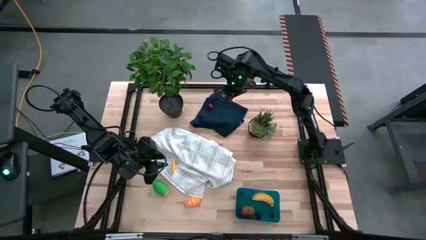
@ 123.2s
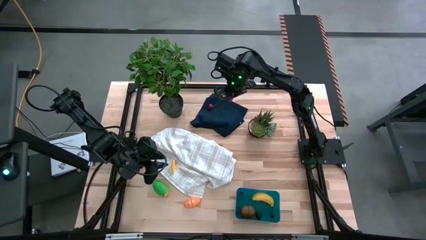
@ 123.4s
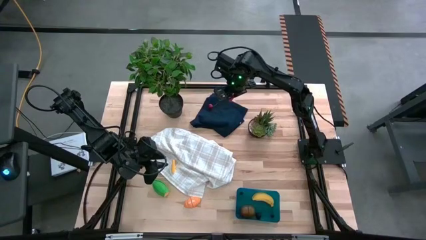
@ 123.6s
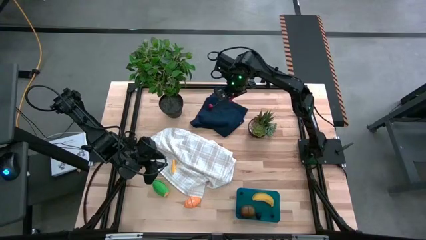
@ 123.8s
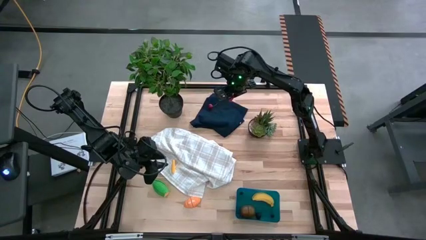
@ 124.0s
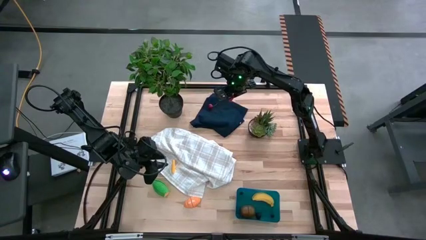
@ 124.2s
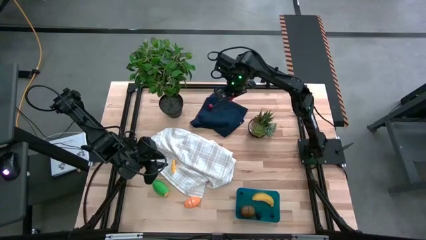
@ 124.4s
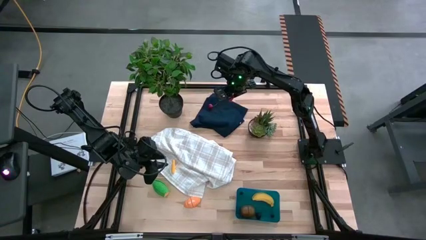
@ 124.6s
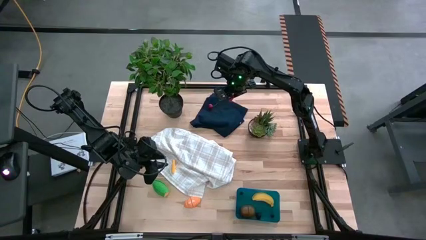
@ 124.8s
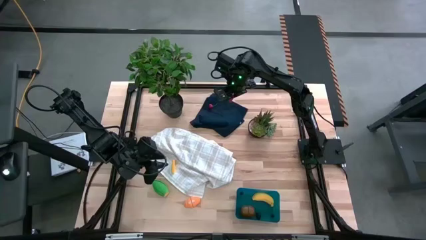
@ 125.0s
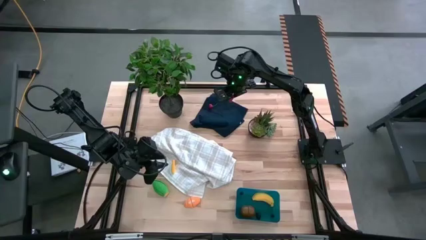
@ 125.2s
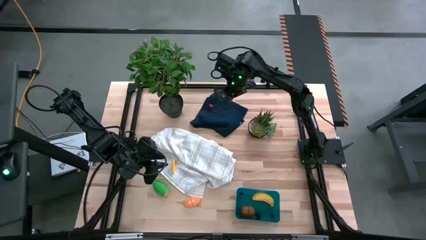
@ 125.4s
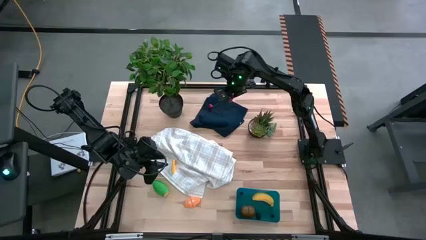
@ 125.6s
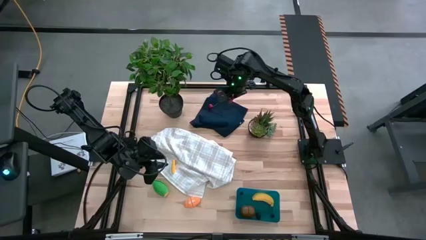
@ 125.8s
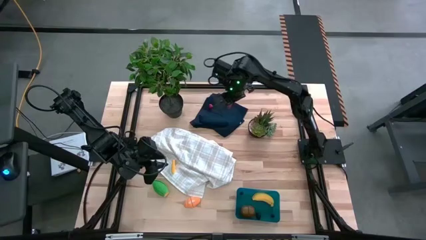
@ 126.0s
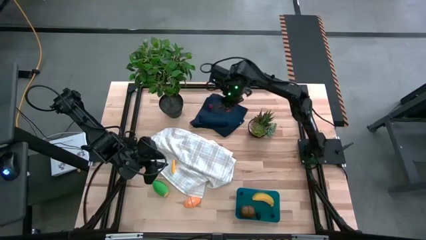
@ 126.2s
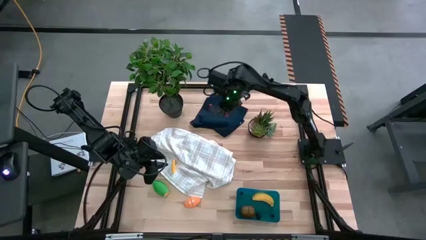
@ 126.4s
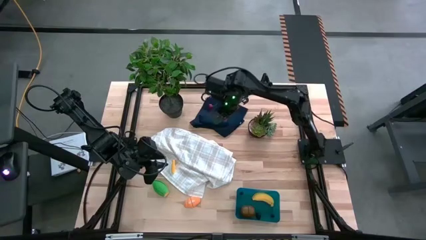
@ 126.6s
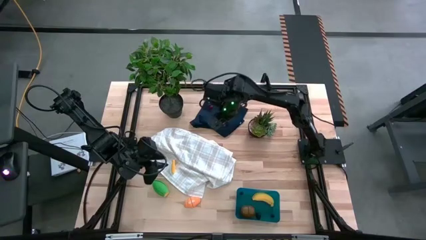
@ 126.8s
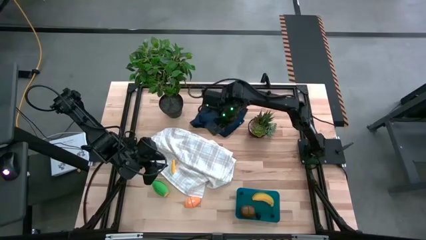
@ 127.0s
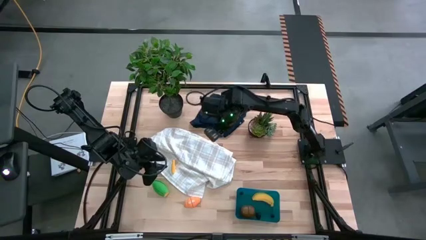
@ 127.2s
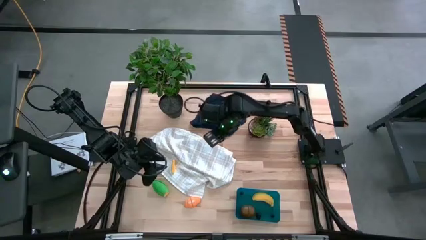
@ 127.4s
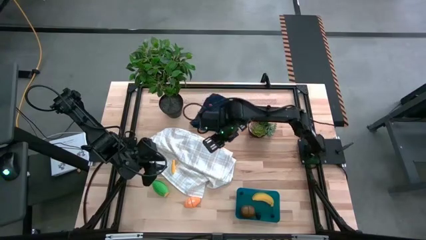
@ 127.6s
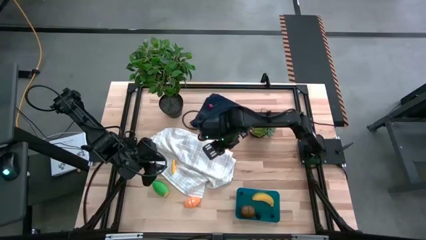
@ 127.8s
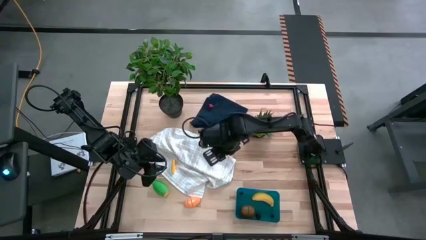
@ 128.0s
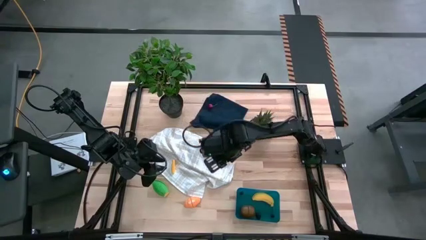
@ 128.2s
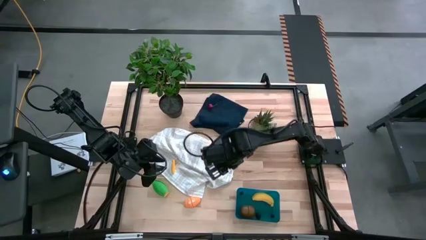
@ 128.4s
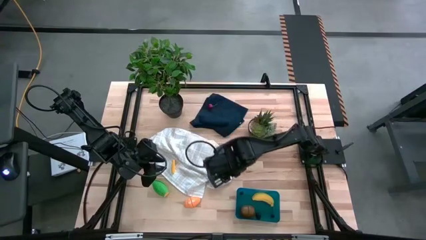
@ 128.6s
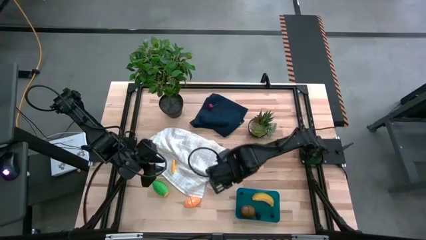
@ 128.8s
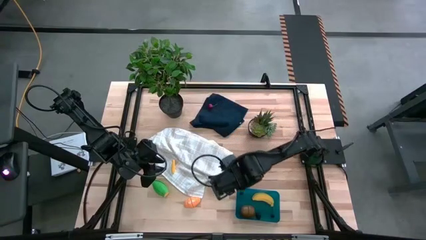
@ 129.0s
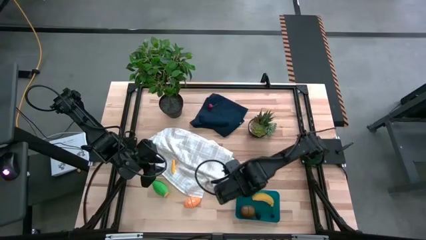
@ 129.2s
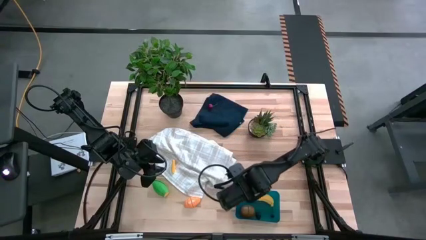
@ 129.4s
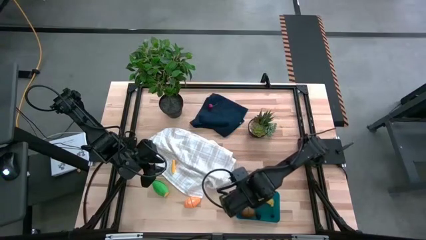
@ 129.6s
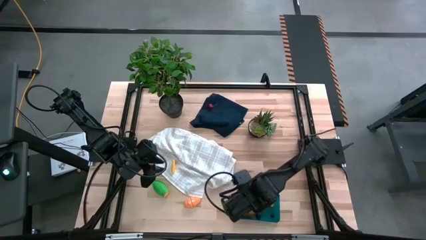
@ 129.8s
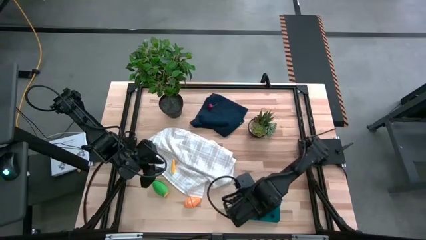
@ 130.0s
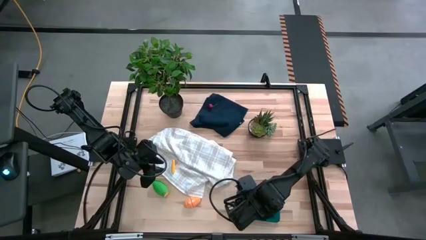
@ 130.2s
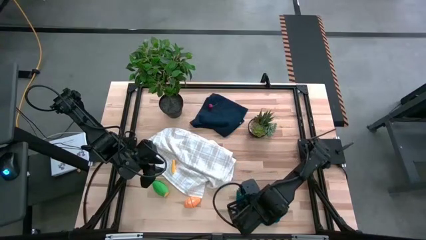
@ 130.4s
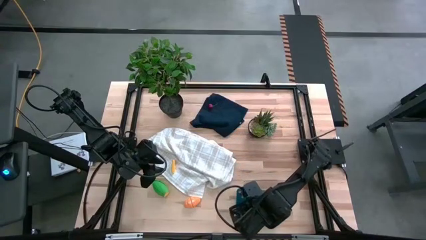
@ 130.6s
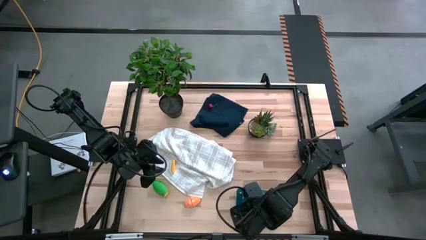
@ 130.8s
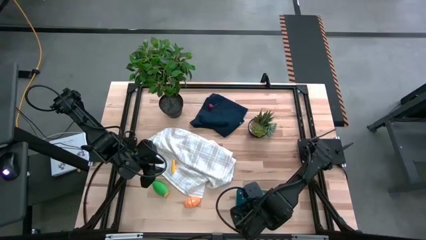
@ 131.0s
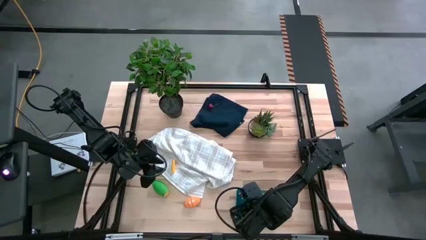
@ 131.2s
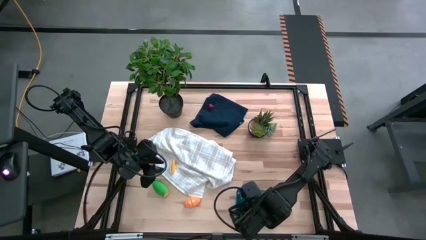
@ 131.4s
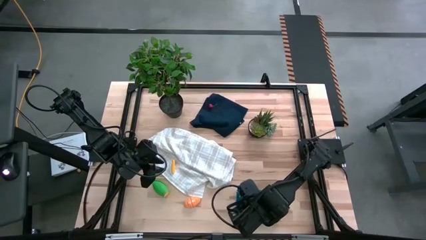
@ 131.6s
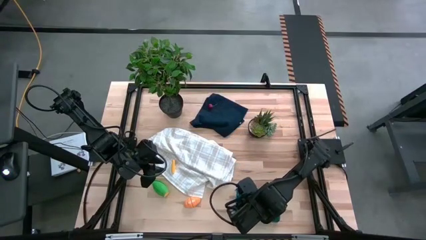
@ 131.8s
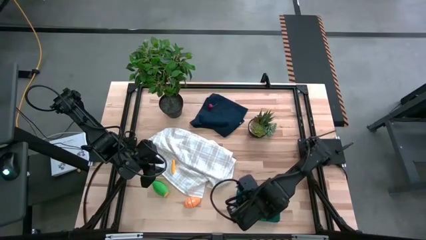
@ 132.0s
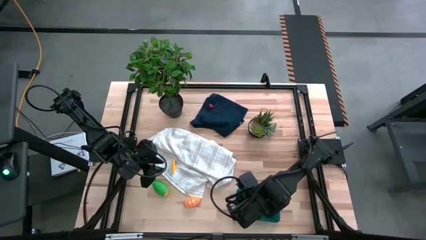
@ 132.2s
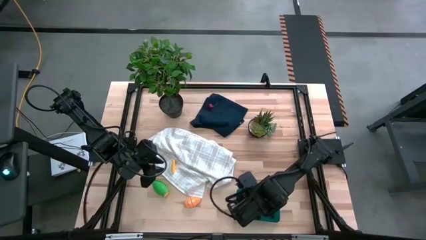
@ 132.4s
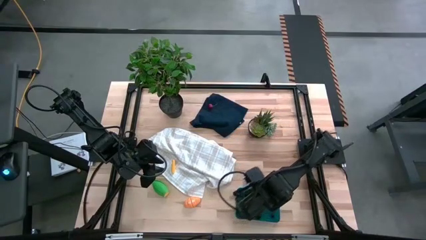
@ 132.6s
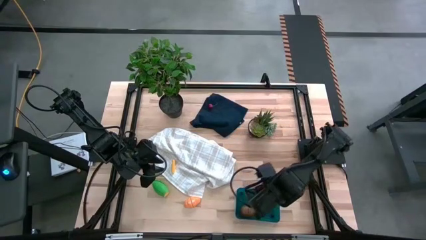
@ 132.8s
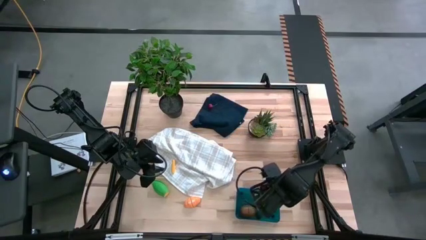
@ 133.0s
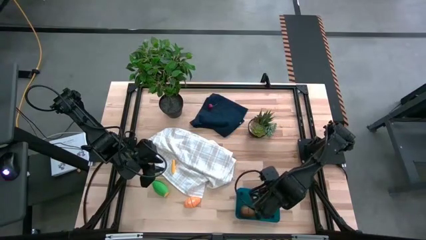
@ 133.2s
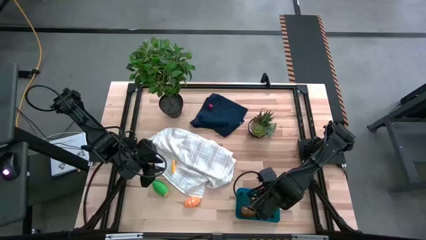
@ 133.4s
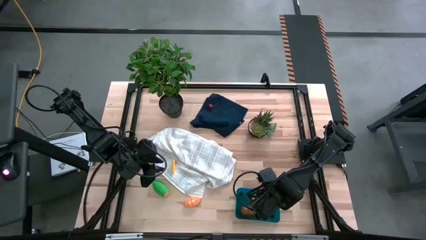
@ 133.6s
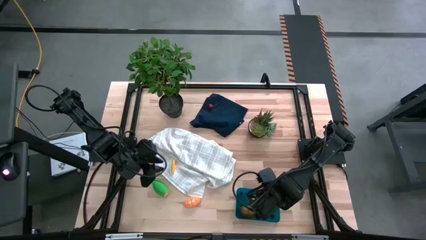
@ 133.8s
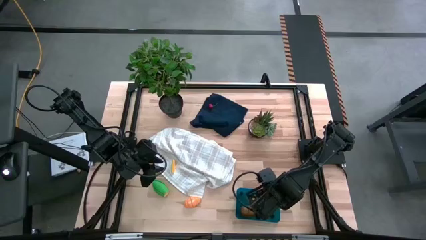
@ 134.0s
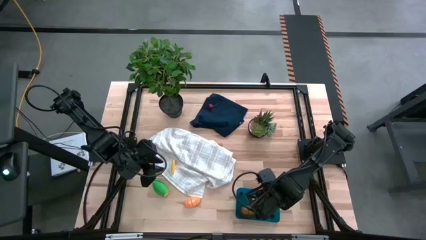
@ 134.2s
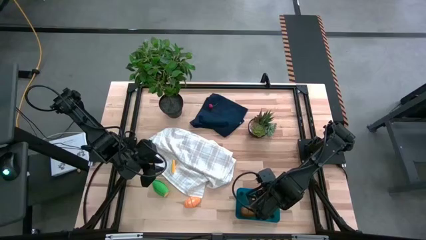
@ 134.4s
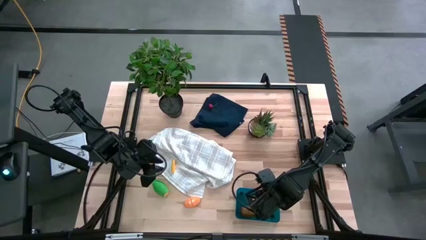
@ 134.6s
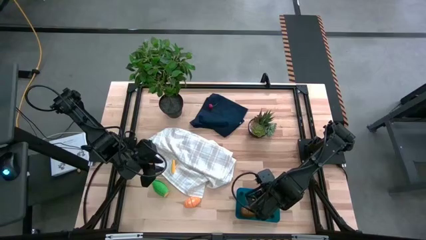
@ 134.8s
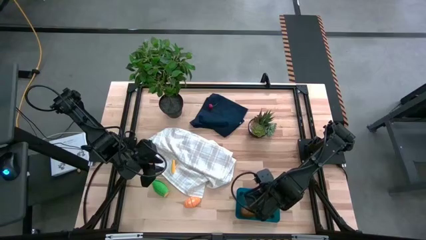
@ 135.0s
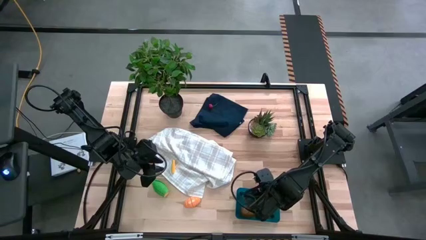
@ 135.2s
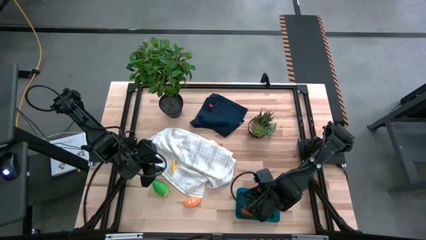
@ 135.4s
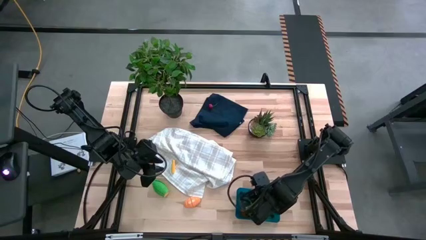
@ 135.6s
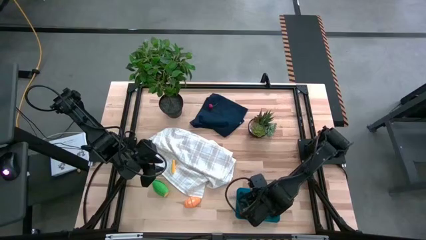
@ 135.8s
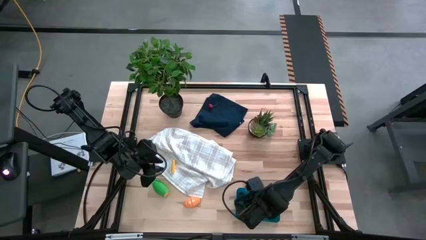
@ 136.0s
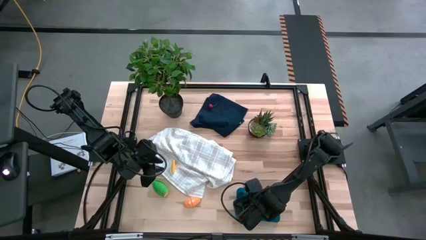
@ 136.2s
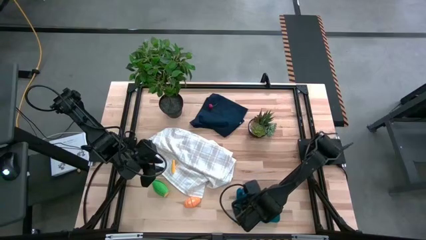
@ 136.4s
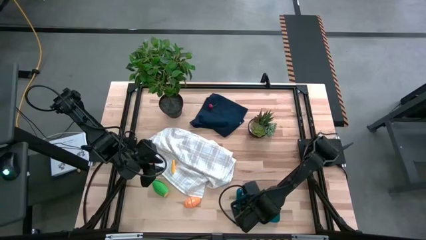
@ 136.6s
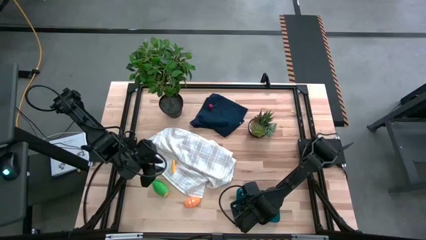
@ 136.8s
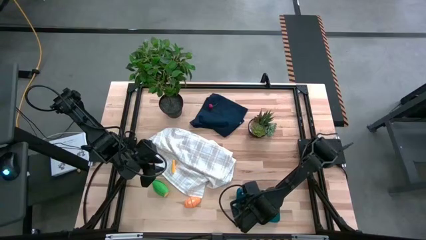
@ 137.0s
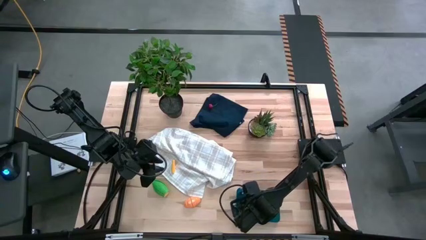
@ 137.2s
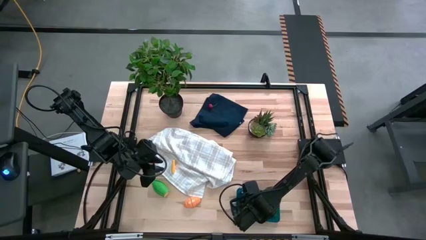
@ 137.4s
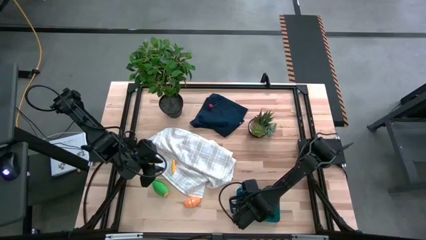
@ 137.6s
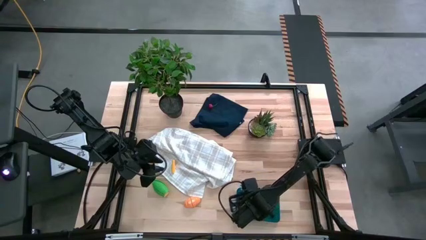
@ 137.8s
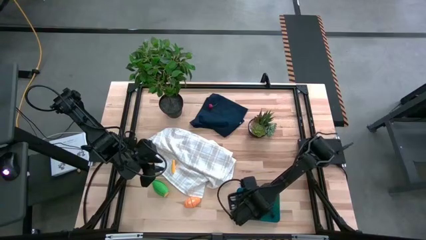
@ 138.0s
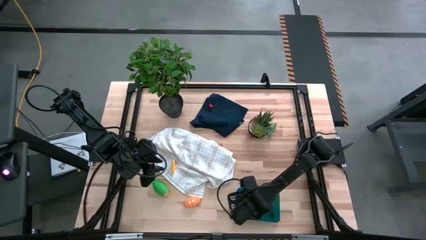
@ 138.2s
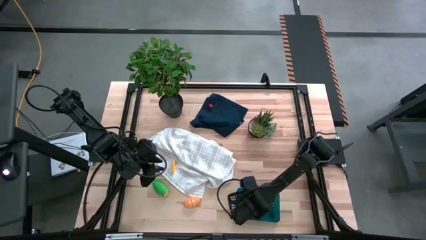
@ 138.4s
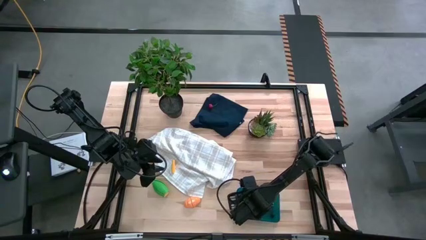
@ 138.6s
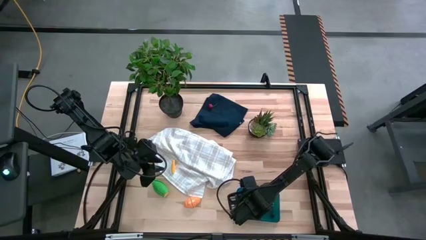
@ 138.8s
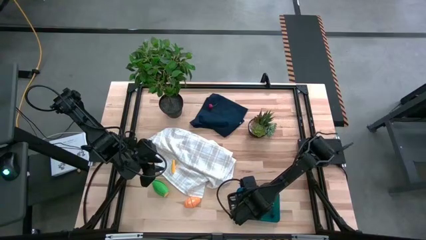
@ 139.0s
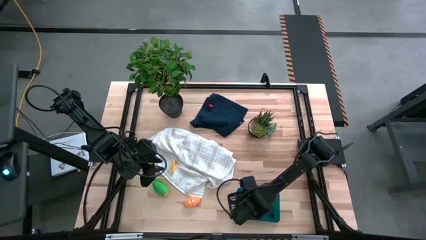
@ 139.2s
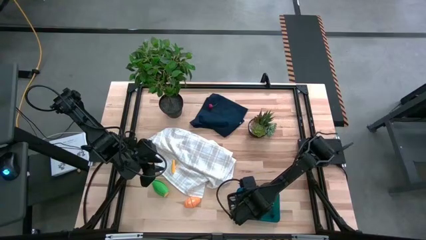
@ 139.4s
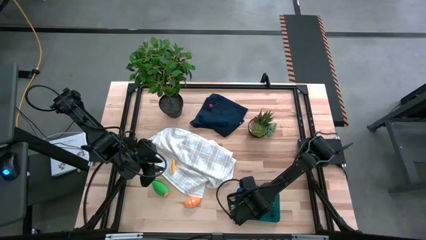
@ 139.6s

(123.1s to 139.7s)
Task: Pick and placing Produce into tupperware
Put the strawberry into the bin
